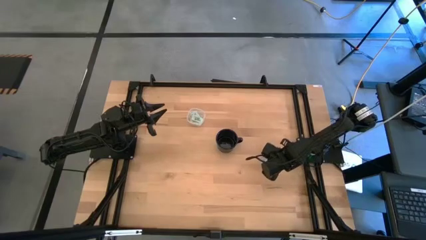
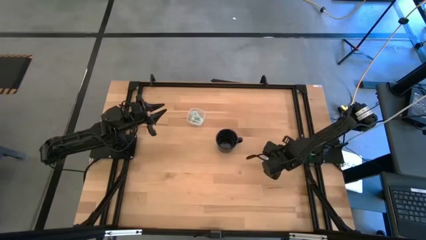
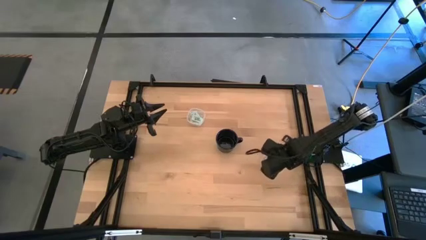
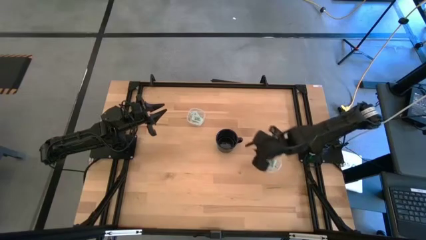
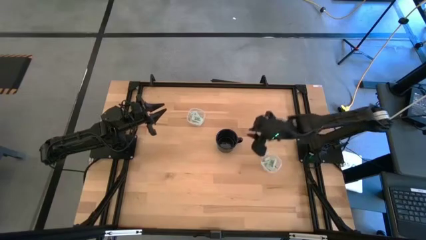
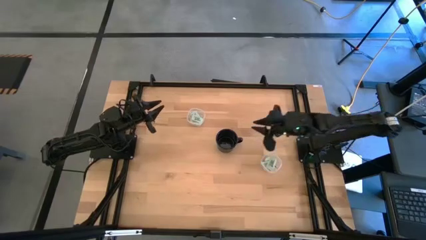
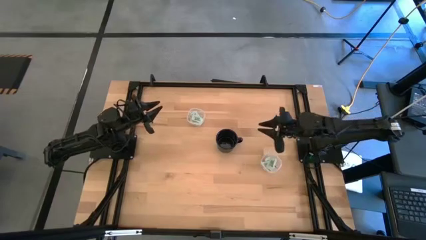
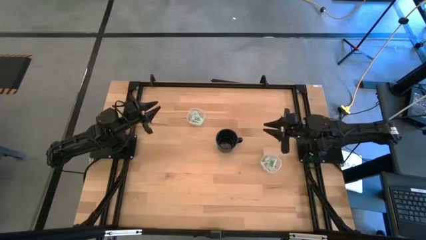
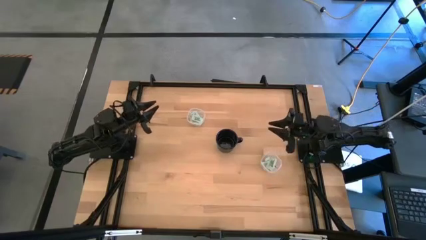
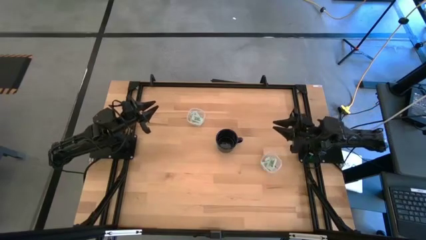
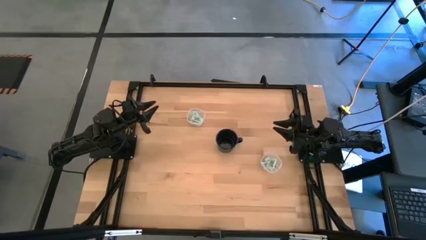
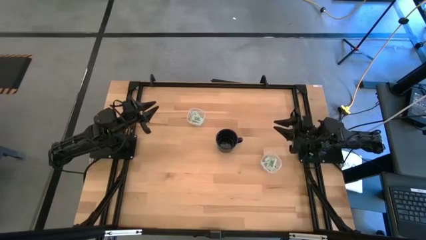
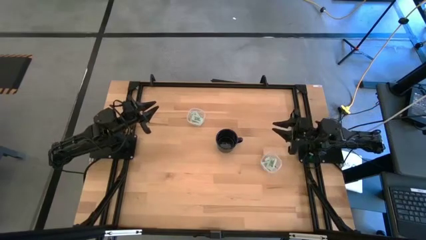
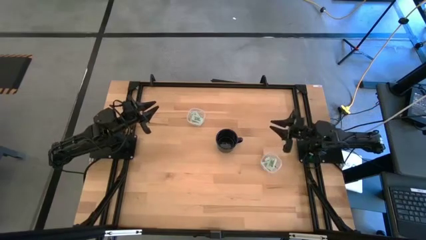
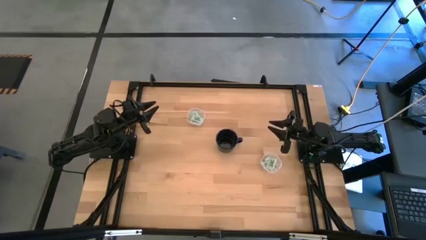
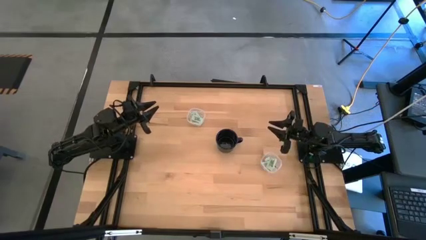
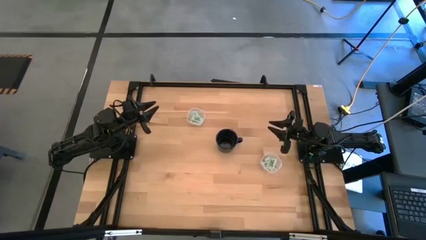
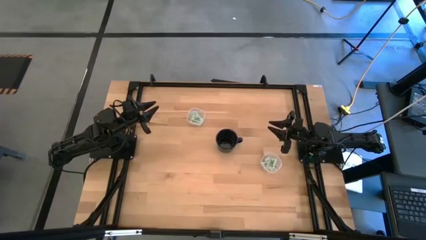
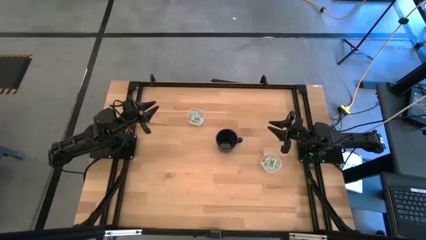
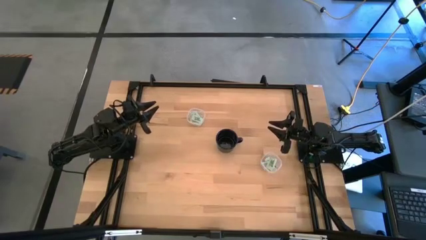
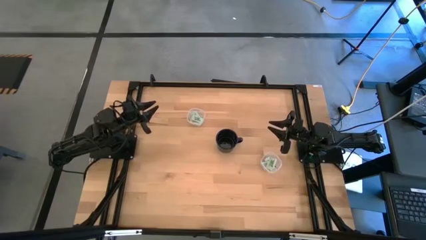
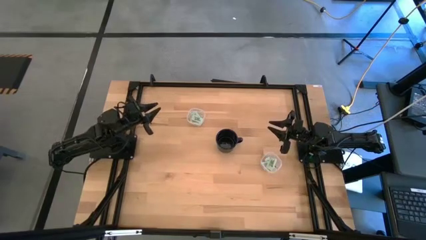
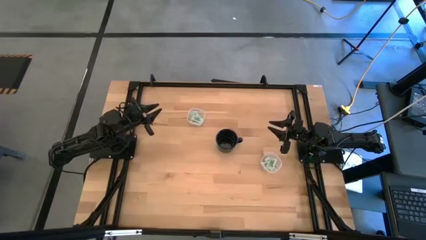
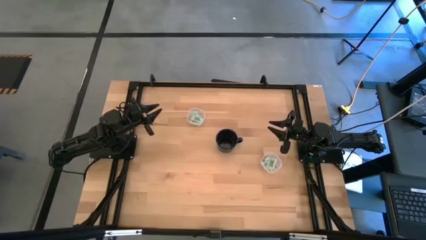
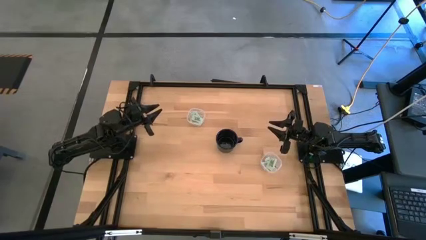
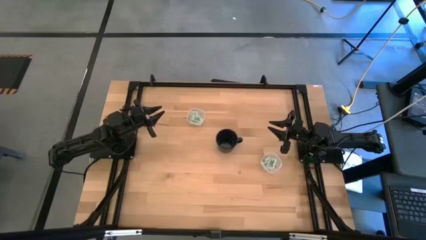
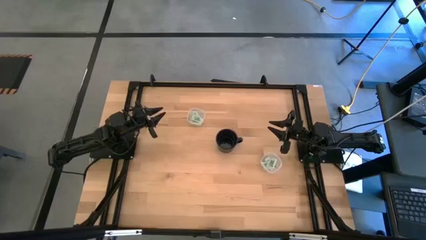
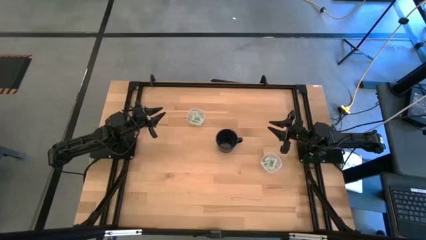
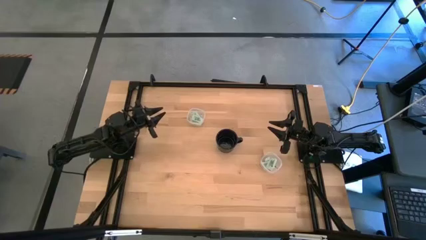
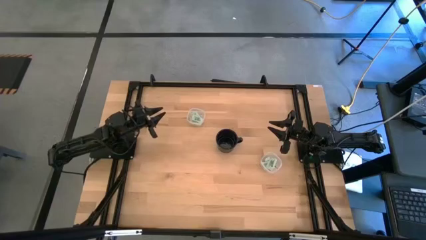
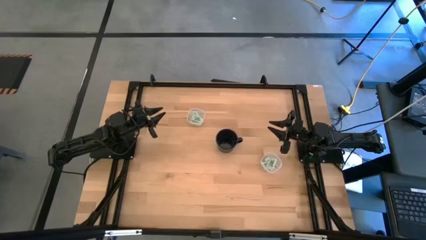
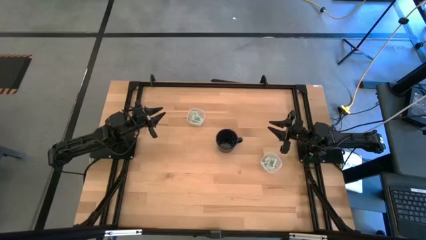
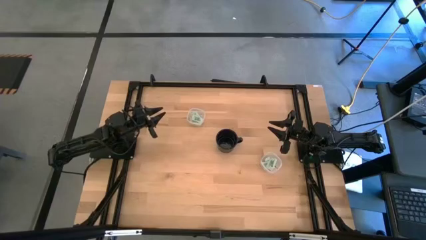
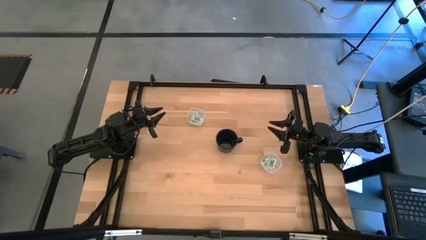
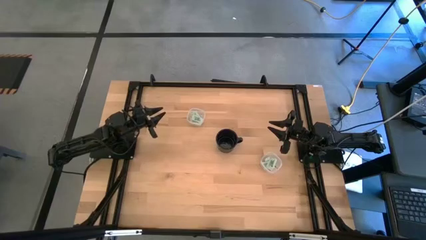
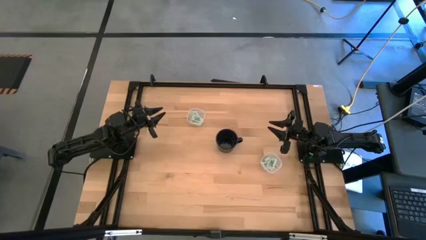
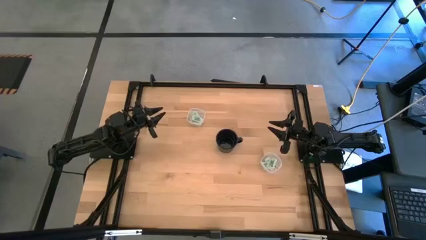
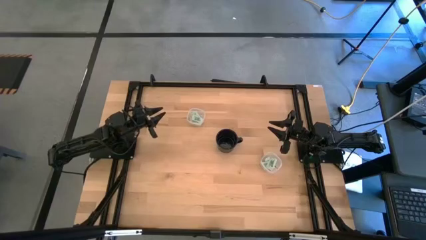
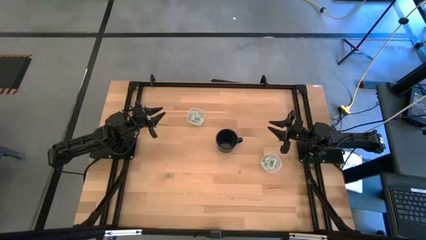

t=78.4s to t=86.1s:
Task: Pick and place items into bin
Return to Home Position

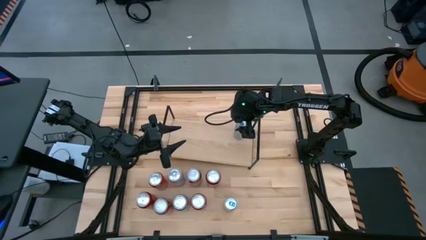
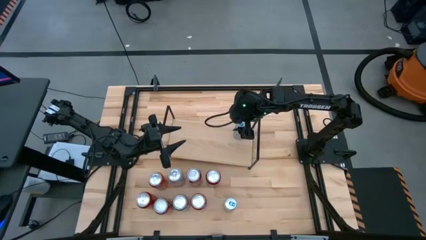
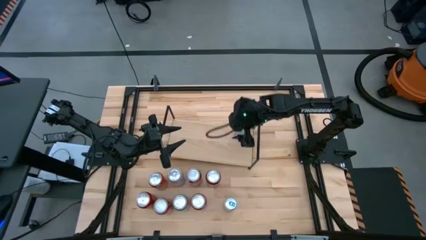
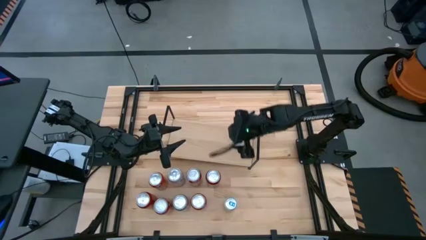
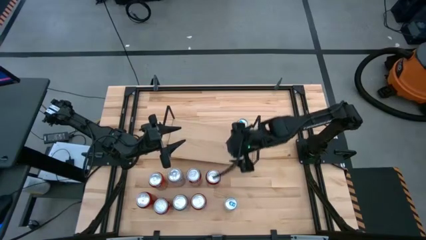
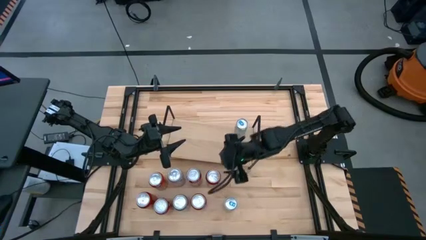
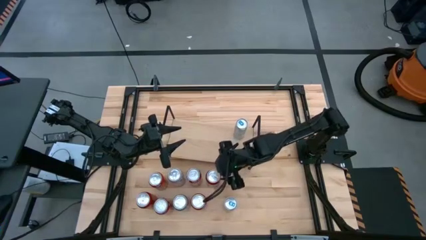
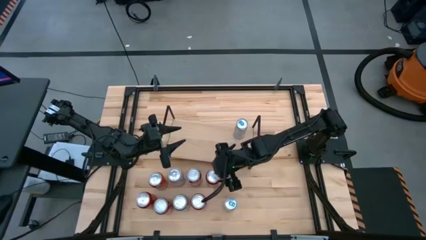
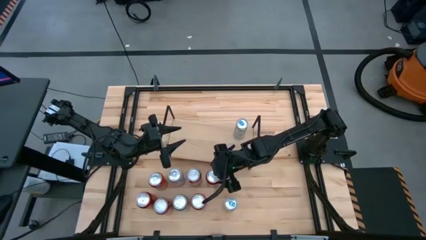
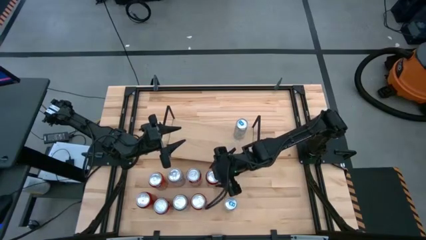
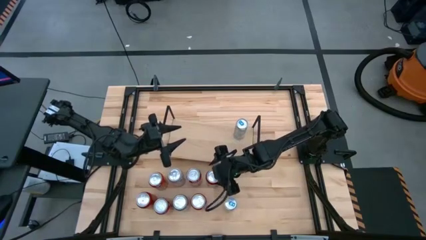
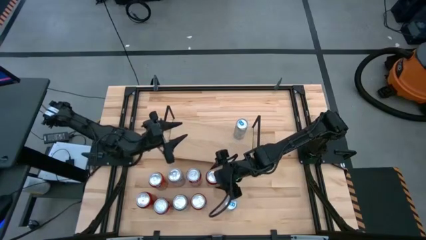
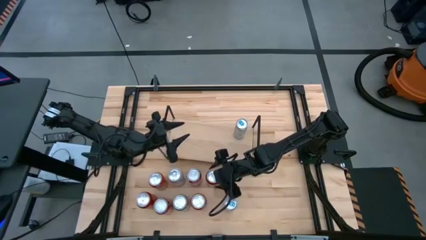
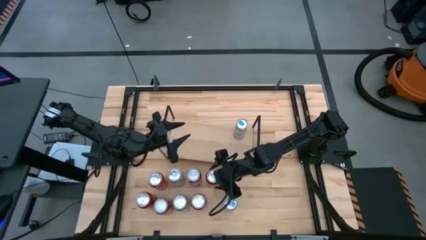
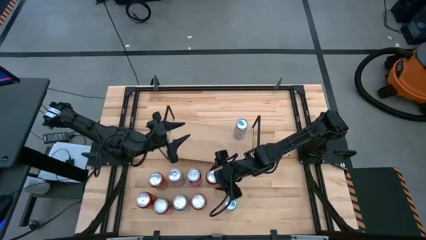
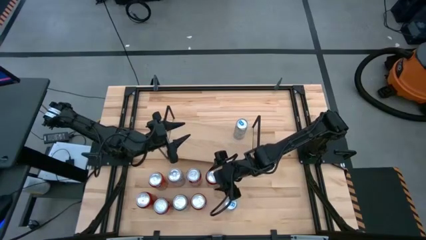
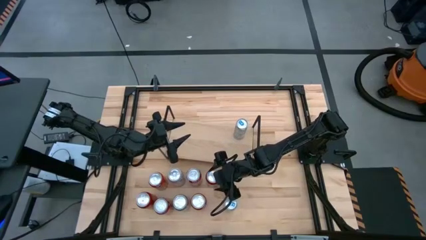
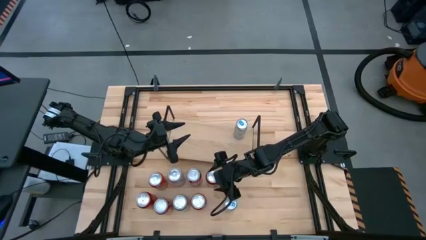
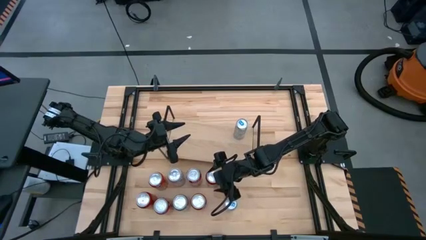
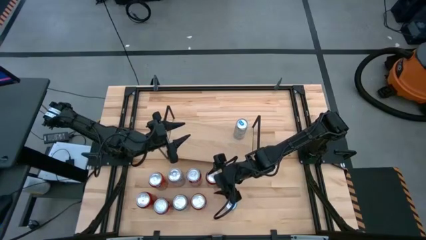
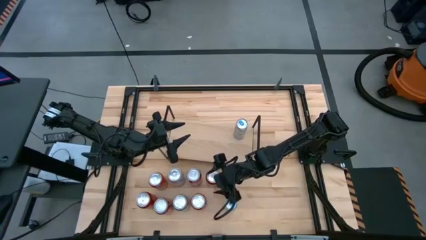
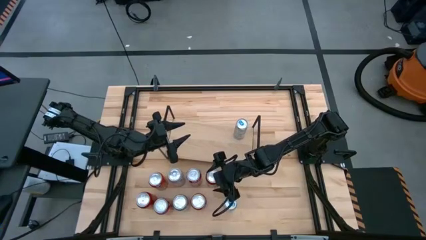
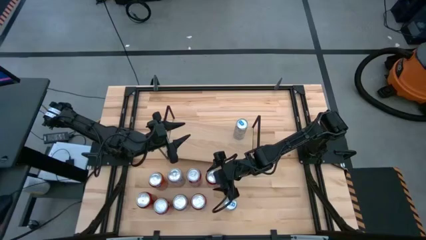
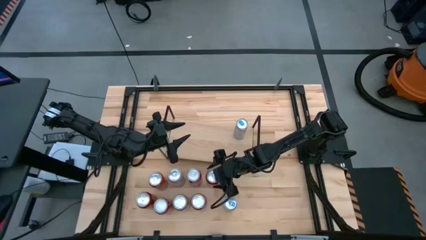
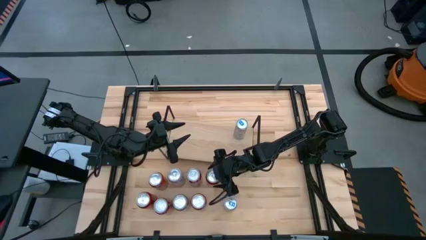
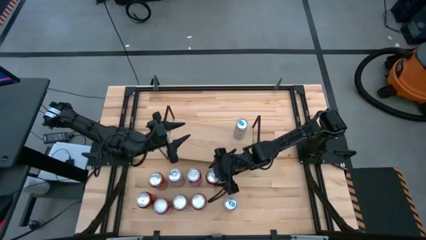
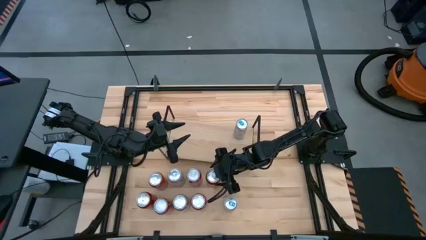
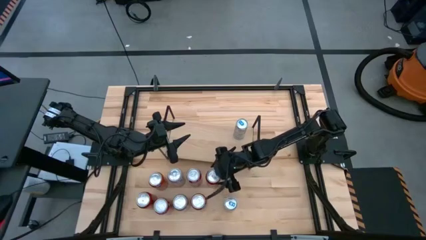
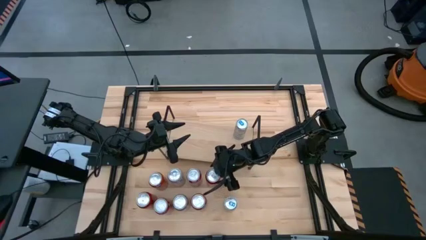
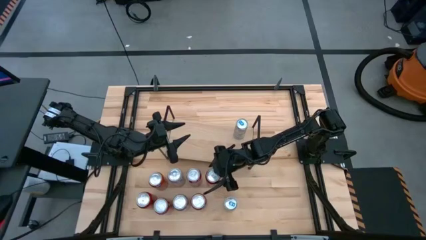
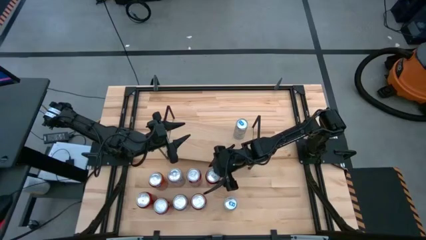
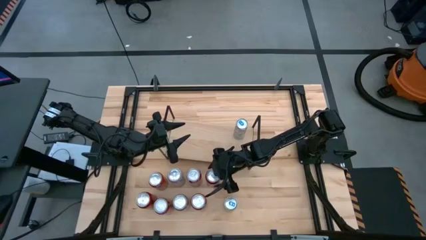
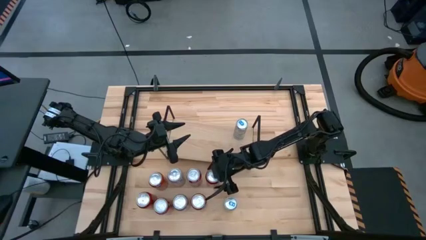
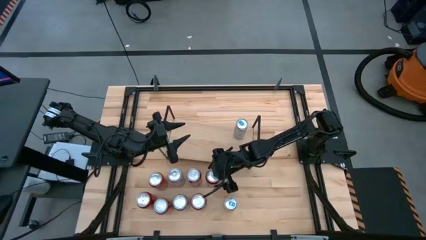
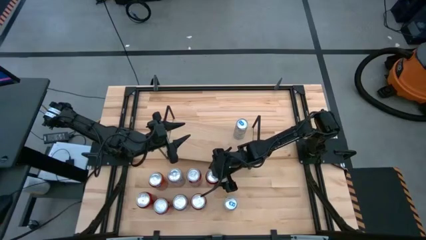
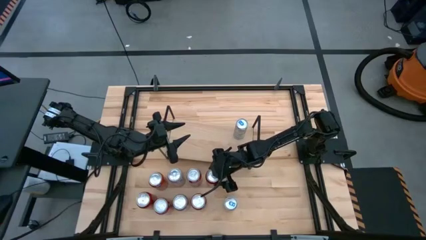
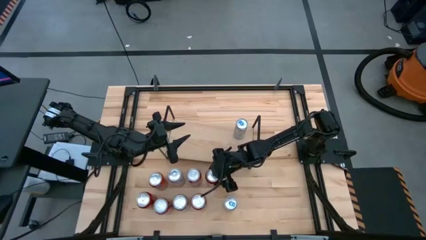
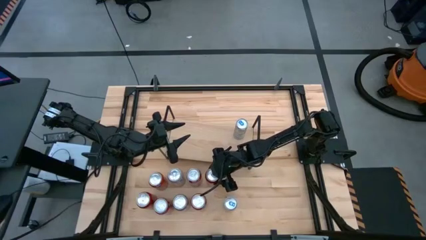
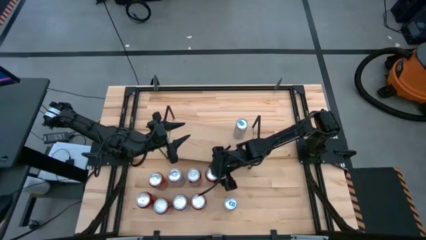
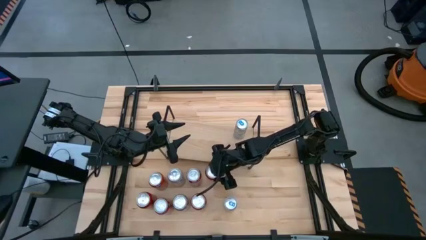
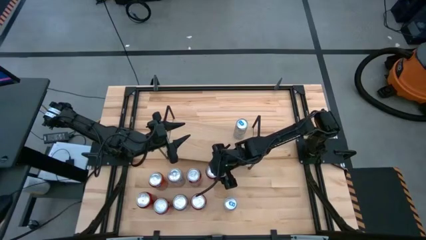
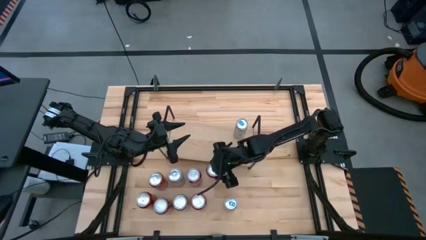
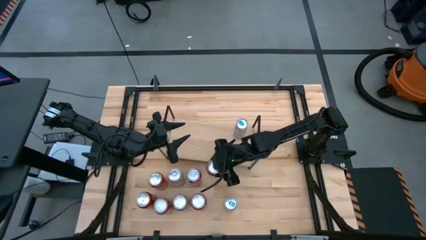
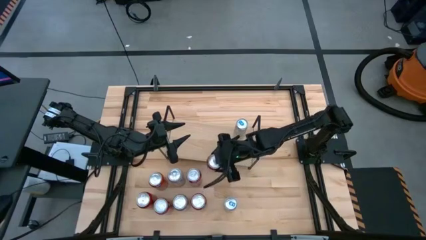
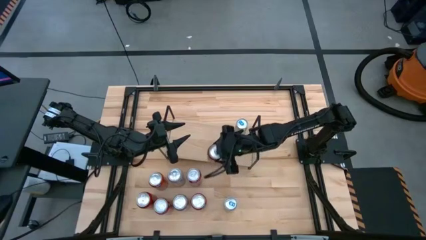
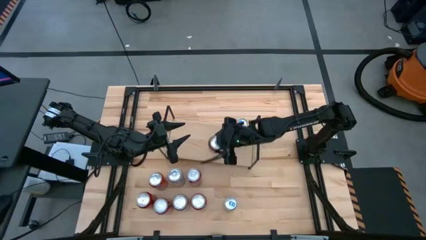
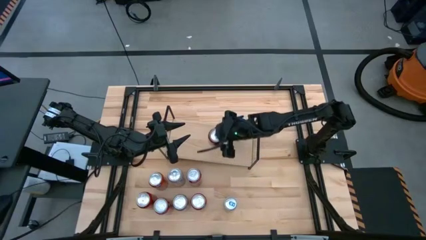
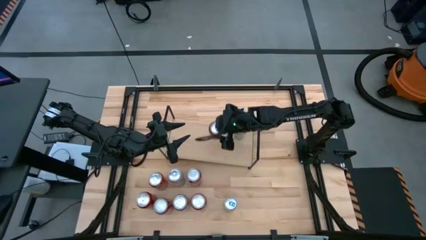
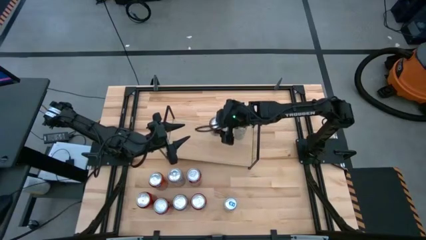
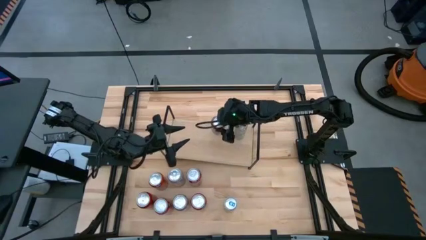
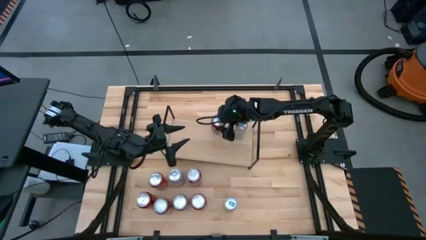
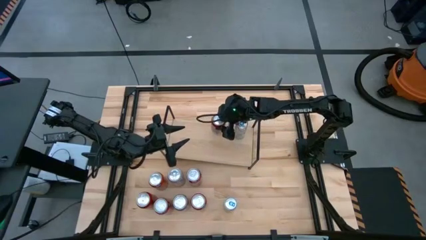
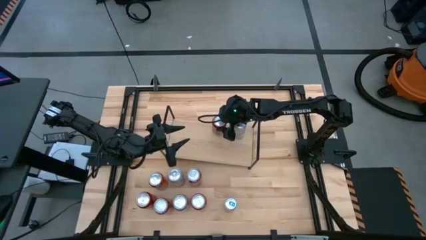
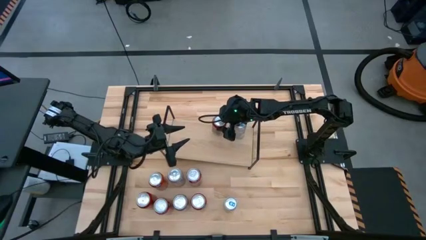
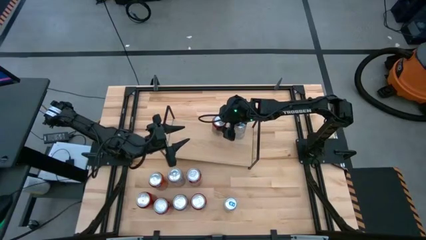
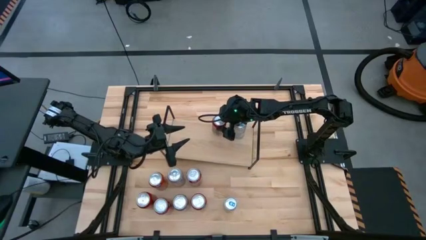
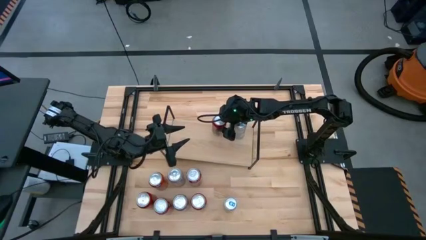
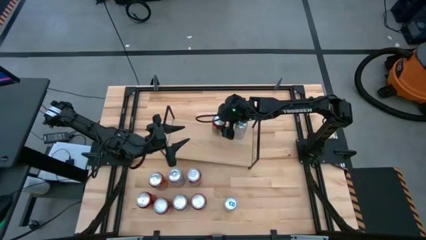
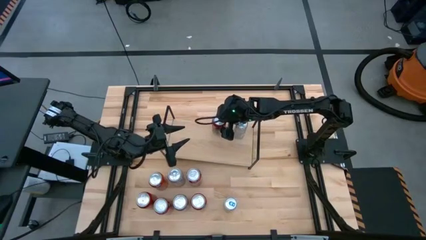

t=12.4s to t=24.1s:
Task: Place canned beverage on shelf
Put the top red-black soda can on the shelf
